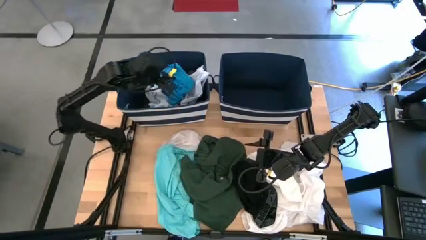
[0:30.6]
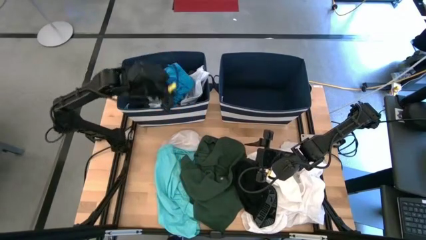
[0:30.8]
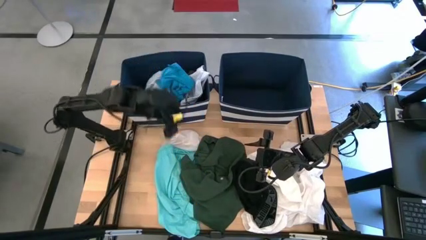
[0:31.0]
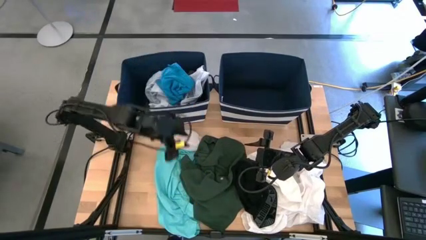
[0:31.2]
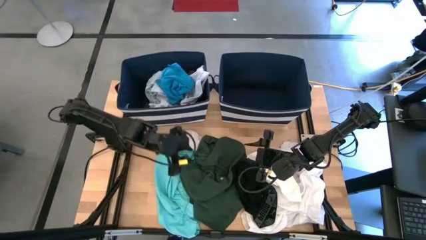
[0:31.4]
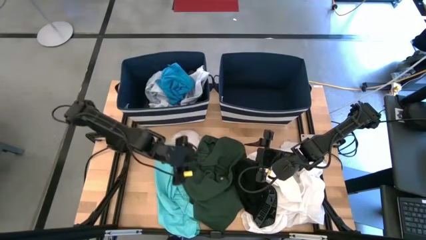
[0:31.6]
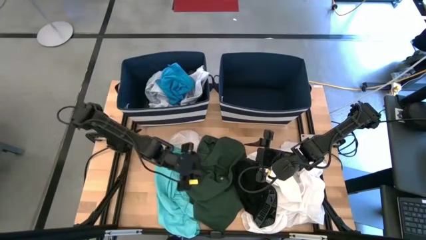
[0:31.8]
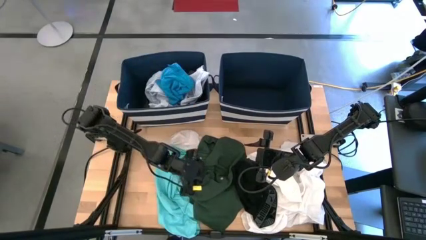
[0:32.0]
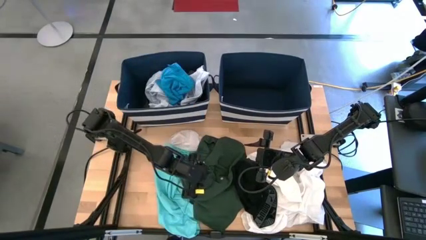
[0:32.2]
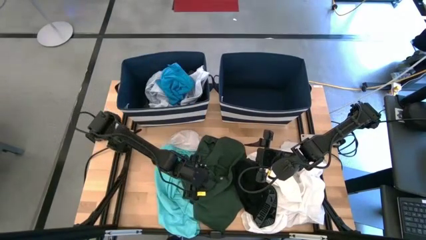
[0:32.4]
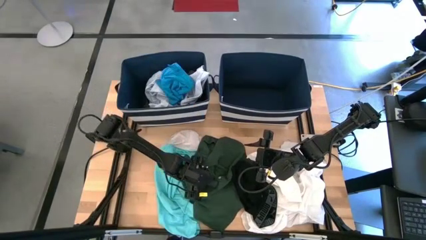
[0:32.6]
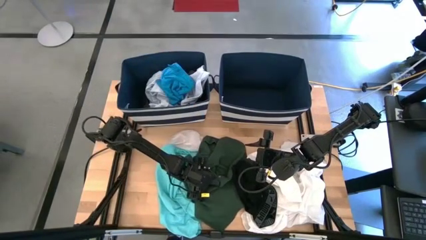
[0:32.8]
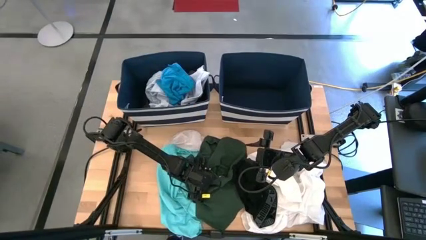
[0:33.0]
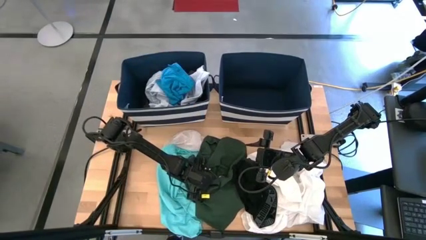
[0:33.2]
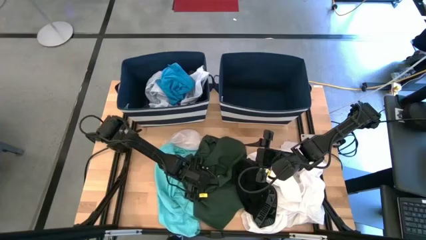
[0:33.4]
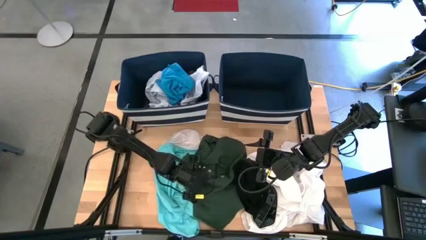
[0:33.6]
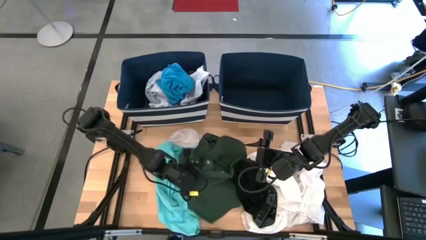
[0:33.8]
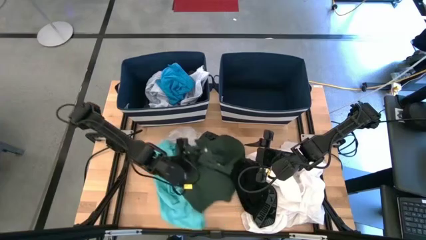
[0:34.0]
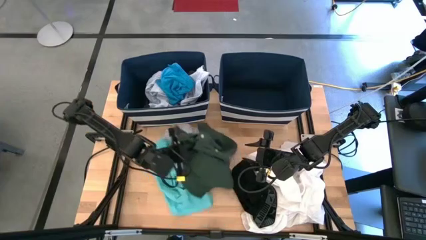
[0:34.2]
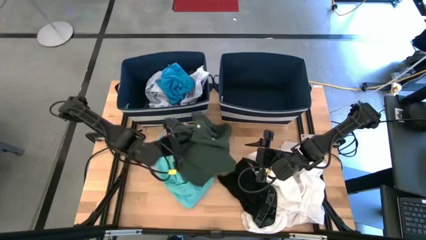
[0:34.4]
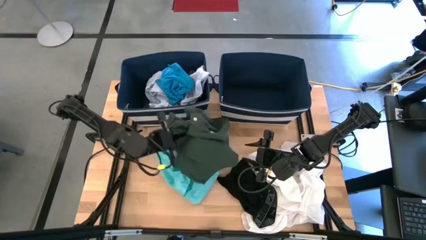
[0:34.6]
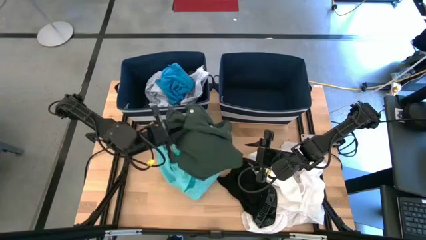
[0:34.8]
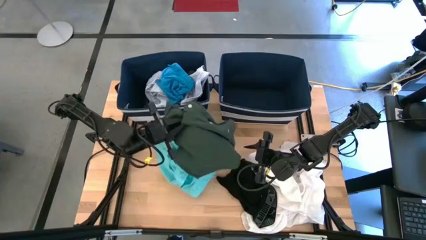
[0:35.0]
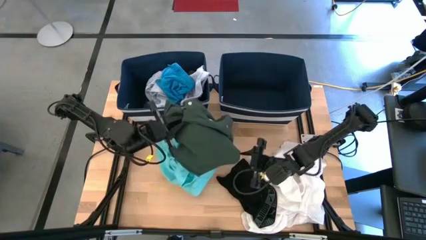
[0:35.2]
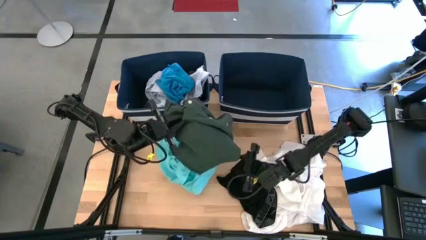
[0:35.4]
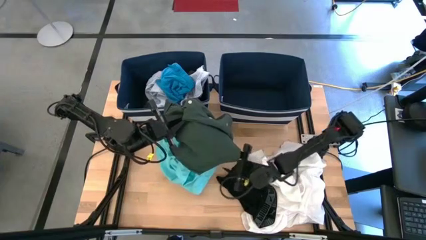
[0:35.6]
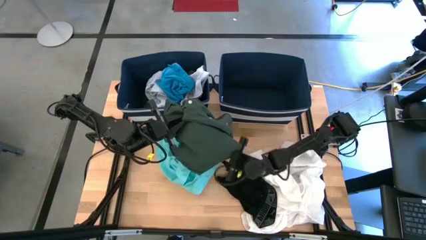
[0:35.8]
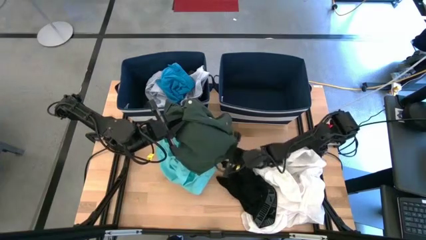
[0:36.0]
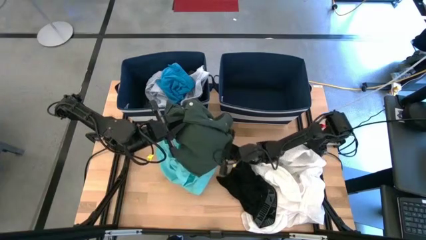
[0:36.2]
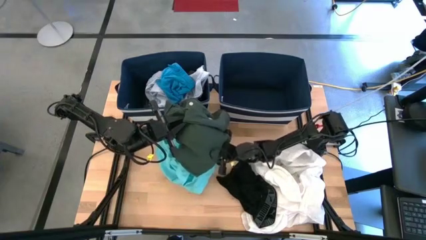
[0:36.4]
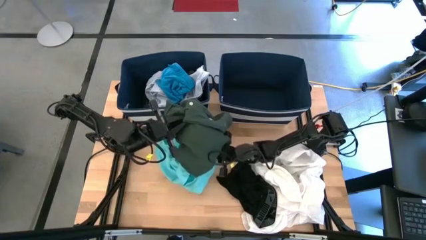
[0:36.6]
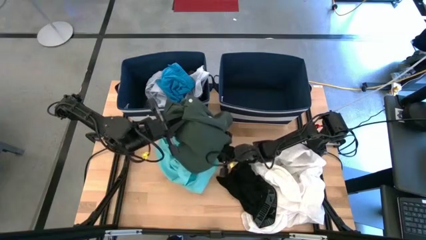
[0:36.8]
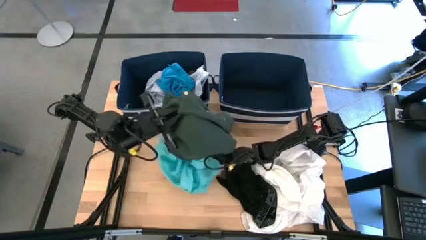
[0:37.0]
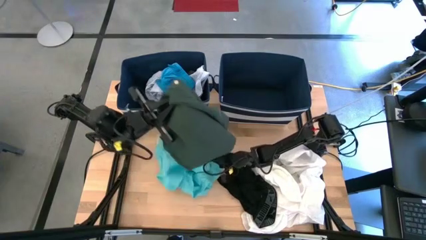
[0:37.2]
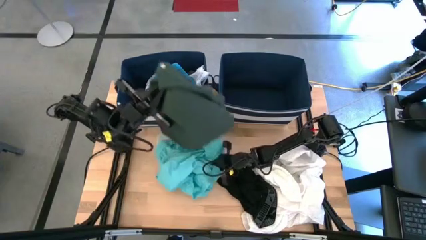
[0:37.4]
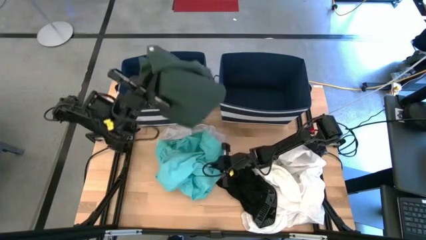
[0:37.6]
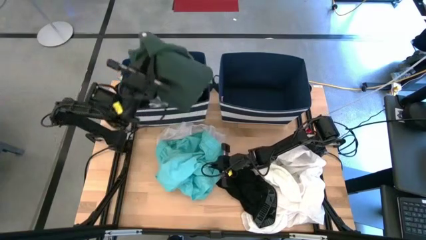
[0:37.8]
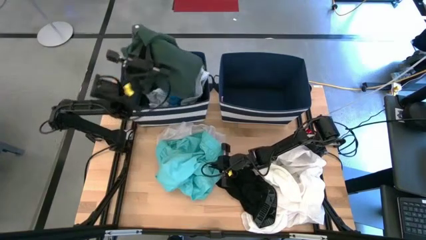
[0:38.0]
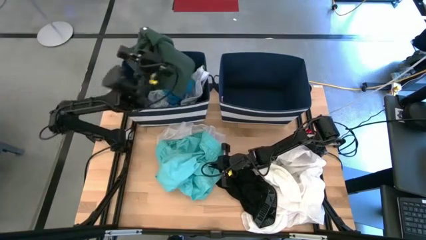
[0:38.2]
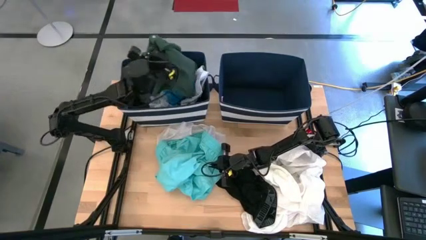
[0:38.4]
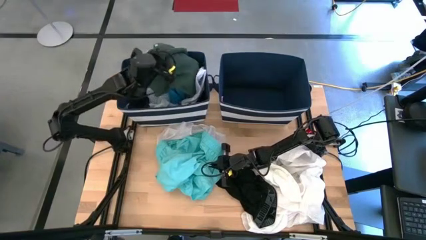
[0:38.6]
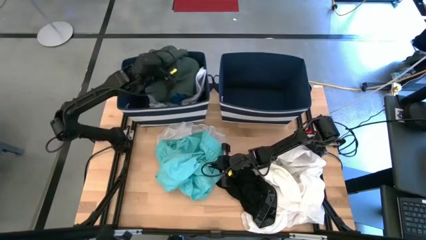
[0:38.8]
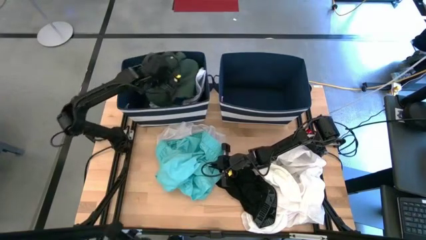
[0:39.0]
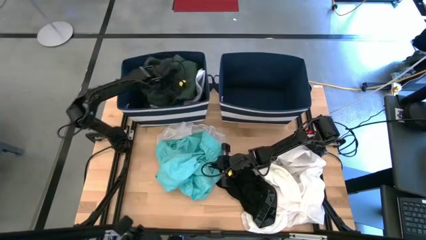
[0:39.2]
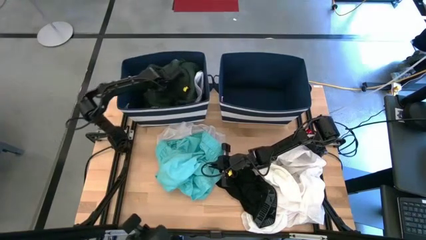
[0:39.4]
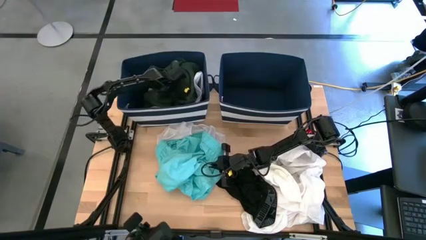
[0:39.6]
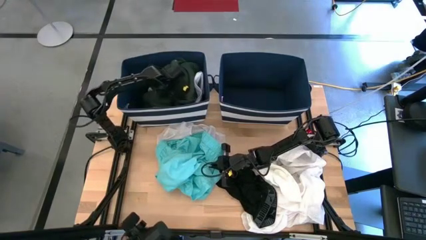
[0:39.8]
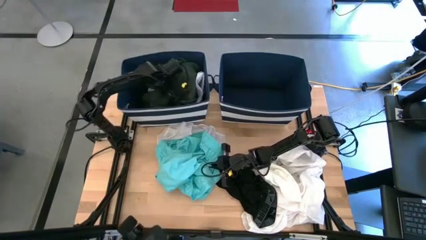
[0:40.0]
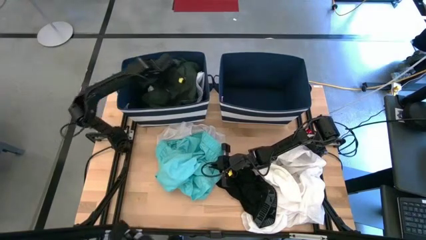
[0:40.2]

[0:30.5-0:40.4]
Task: Sort clothes
Put the green polo shirt into the left blue bin

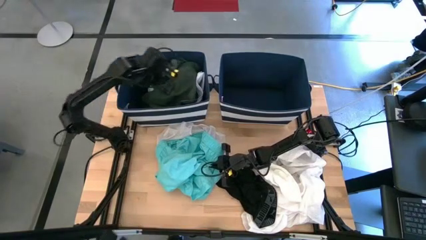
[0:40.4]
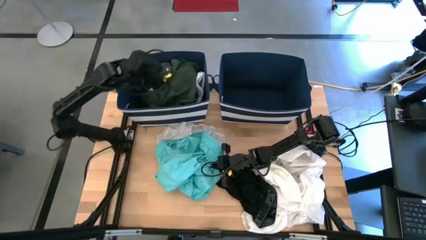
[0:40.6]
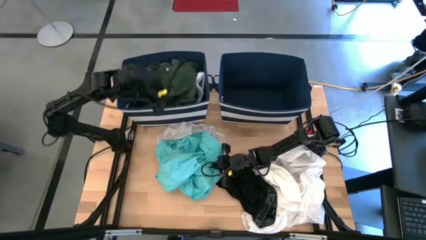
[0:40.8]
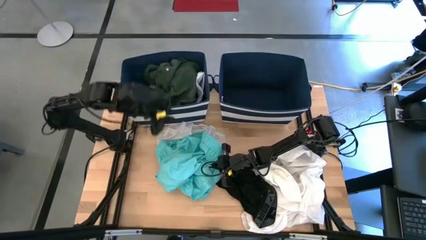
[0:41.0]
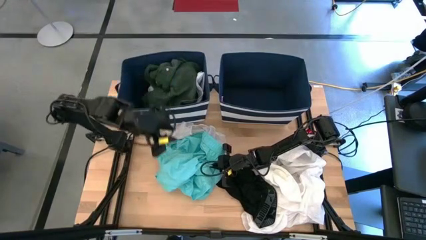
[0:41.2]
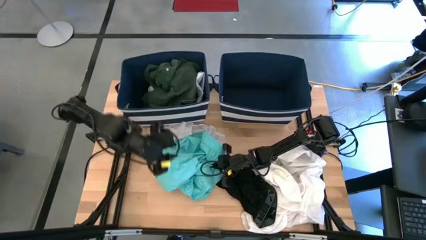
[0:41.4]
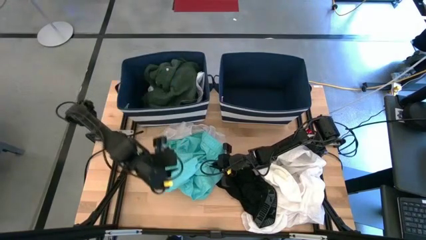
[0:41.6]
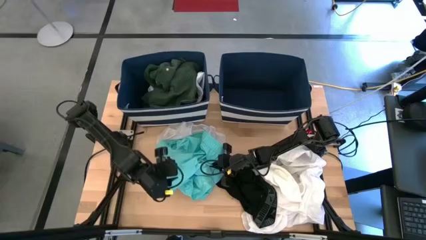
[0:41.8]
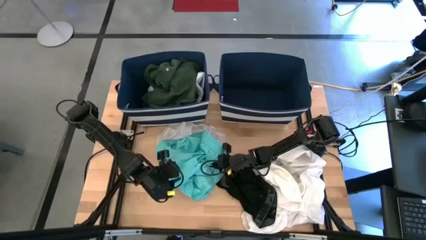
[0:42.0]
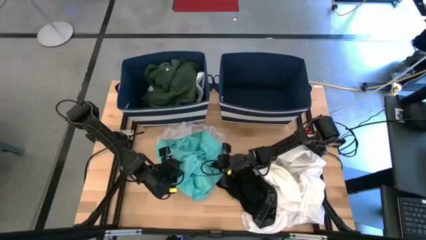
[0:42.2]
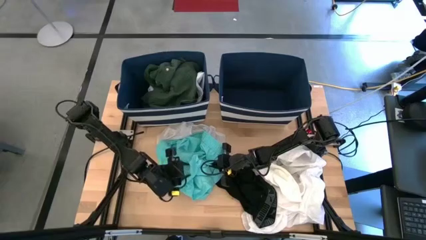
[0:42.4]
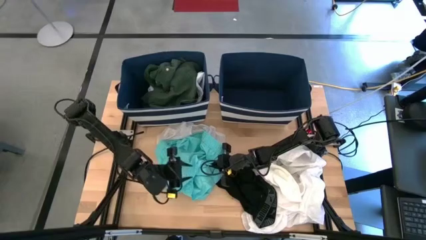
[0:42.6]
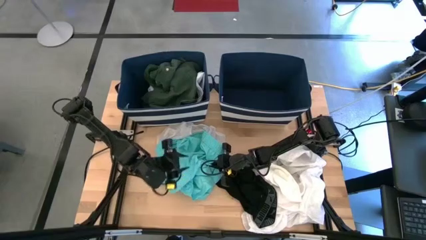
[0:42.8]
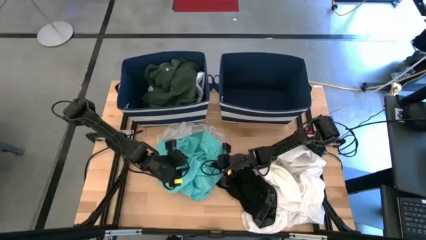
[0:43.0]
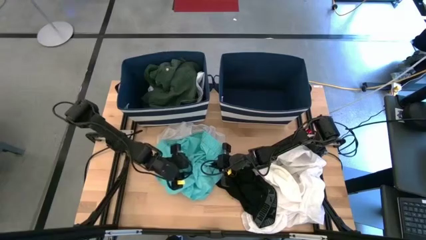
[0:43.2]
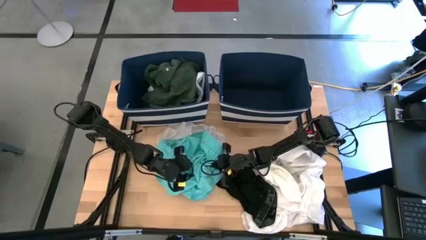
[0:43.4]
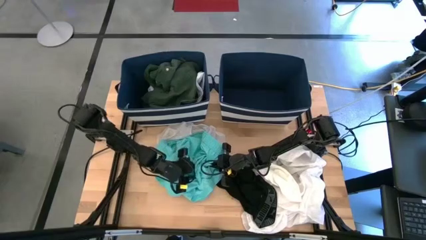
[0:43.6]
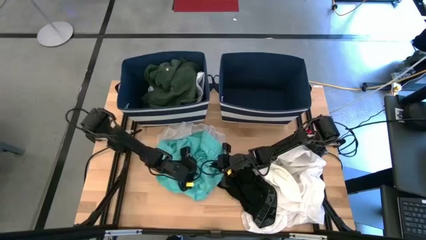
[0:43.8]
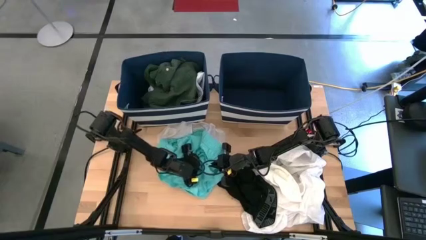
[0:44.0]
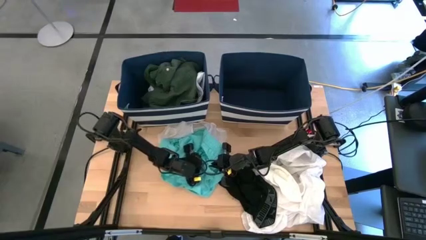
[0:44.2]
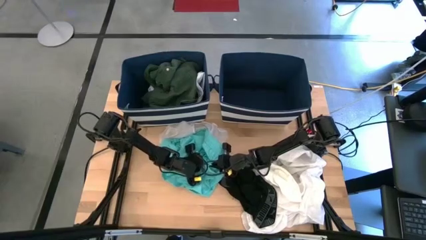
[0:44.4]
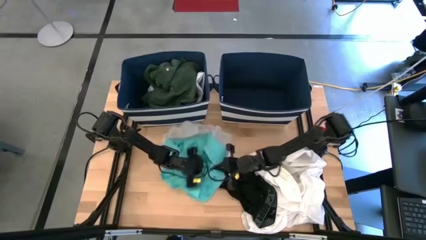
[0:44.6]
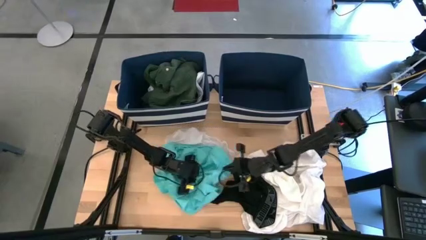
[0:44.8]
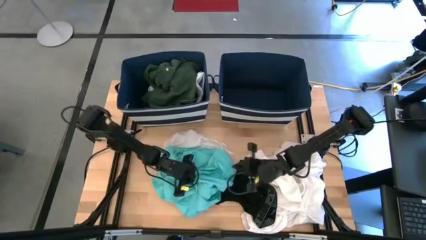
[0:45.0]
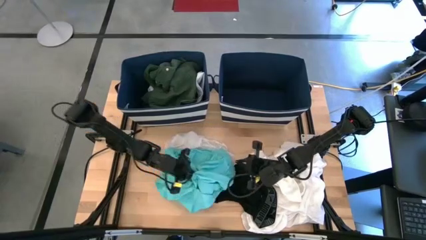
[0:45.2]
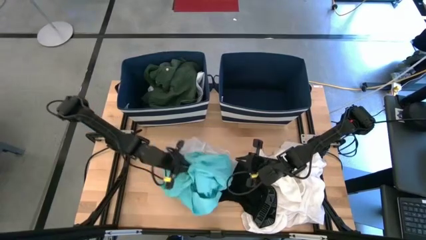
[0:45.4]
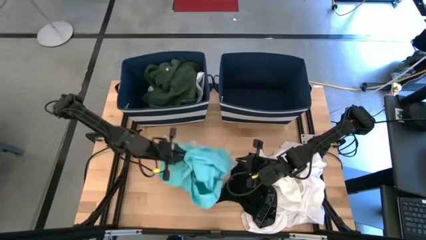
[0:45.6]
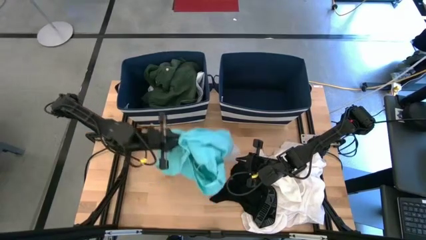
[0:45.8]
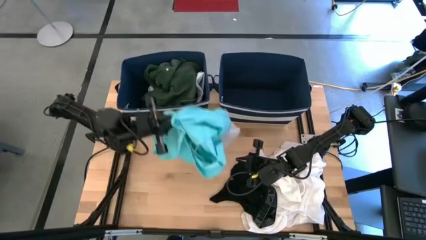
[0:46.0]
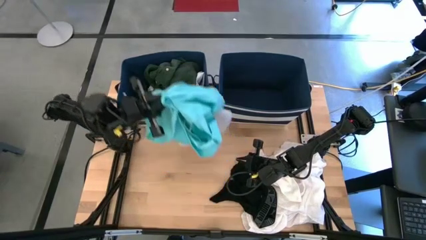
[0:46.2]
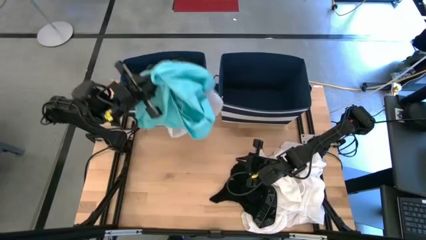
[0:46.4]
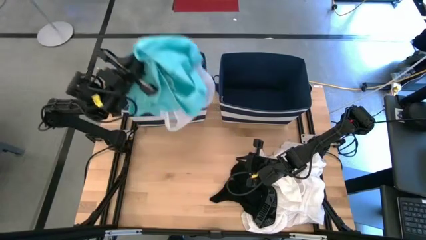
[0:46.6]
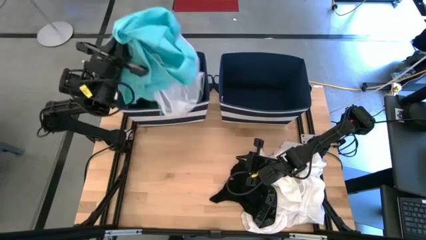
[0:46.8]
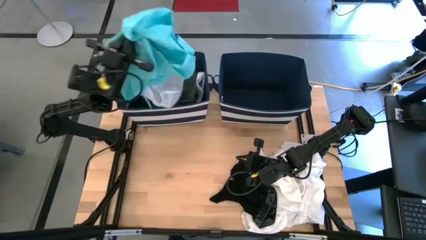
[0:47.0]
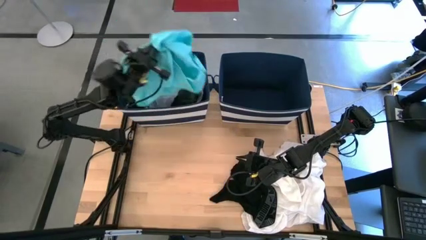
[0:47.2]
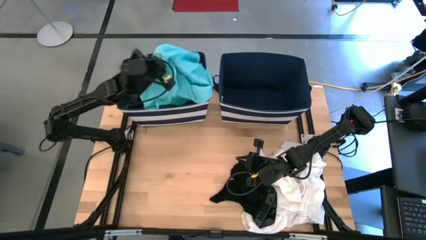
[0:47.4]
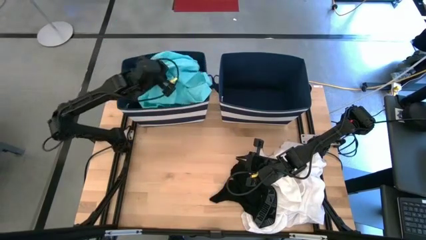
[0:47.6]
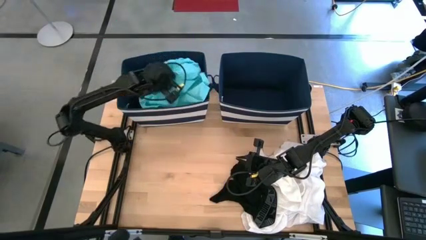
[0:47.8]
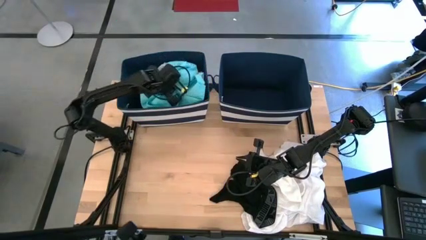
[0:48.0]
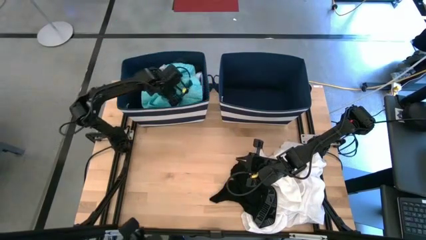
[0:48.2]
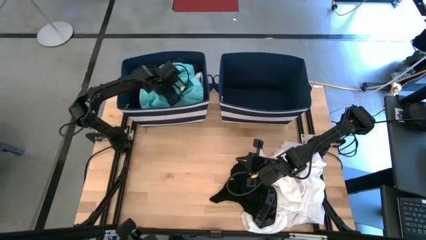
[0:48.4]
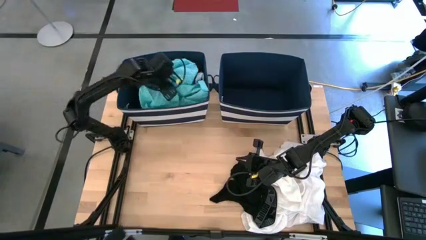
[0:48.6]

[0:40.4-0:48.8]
Put the blue shorts into the left blue bin
